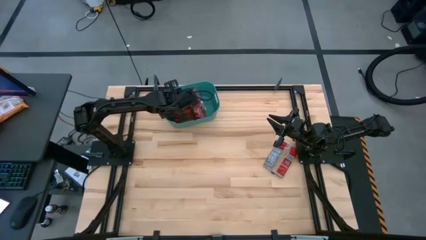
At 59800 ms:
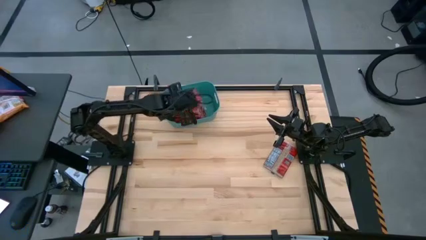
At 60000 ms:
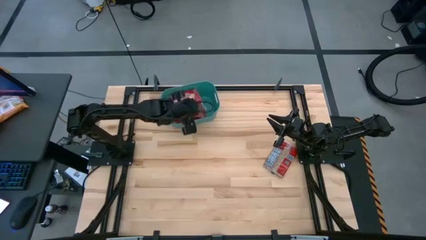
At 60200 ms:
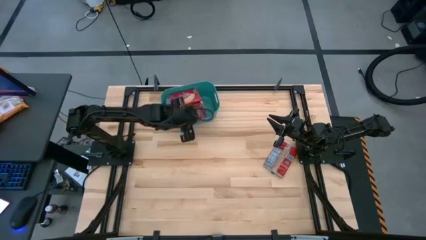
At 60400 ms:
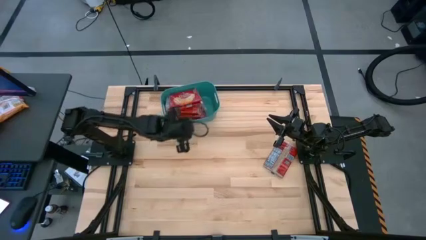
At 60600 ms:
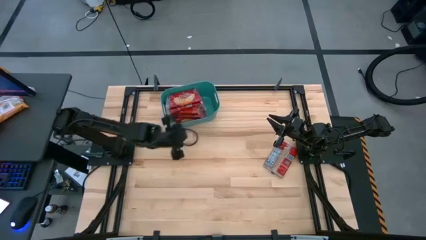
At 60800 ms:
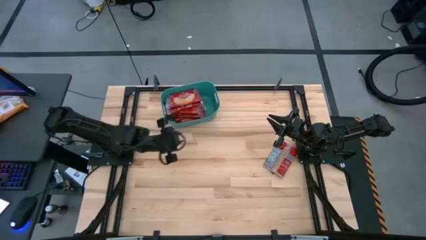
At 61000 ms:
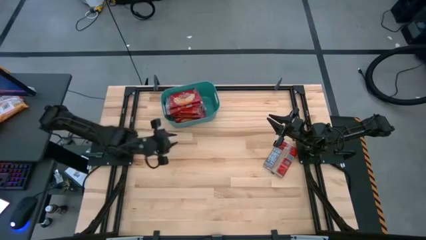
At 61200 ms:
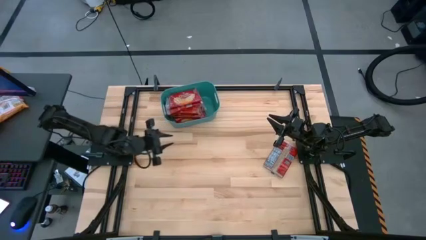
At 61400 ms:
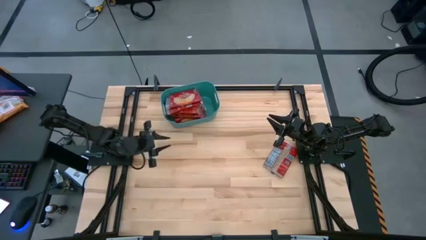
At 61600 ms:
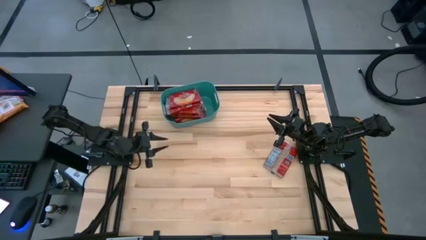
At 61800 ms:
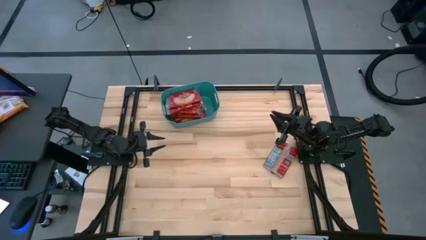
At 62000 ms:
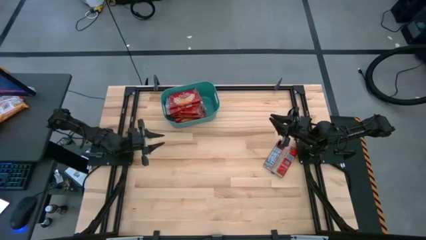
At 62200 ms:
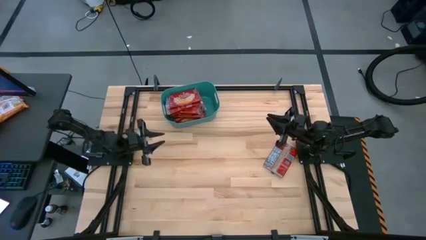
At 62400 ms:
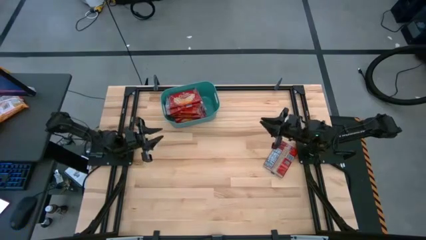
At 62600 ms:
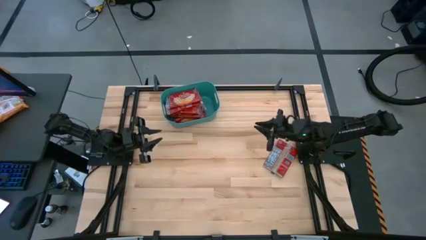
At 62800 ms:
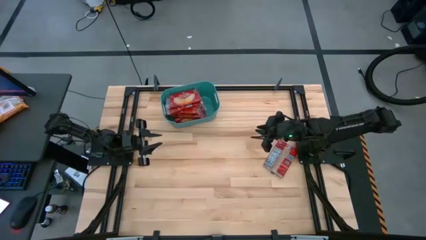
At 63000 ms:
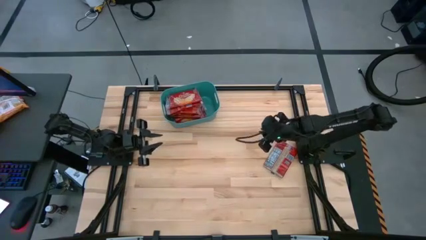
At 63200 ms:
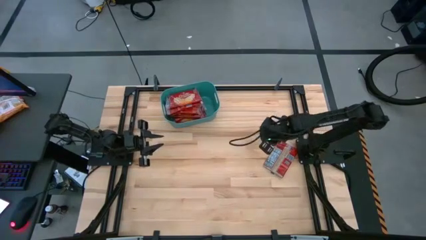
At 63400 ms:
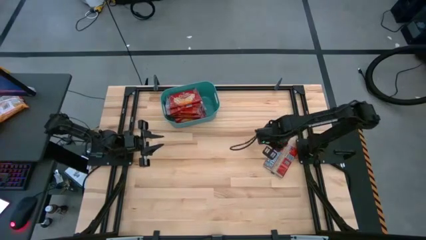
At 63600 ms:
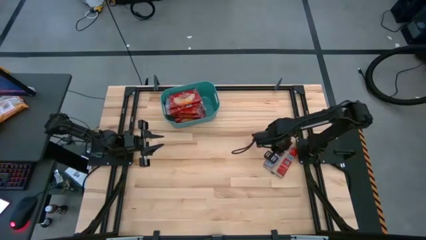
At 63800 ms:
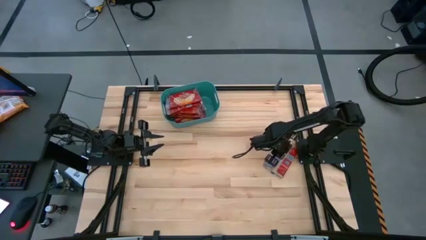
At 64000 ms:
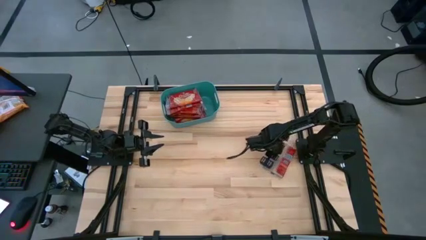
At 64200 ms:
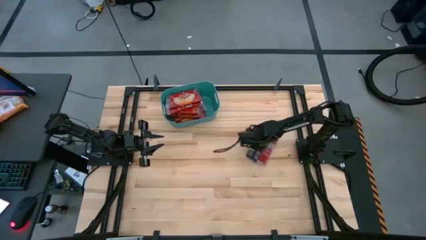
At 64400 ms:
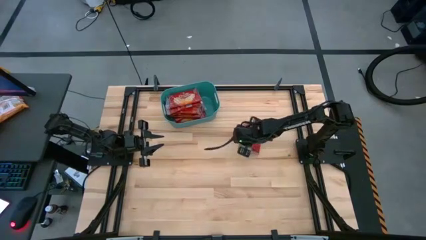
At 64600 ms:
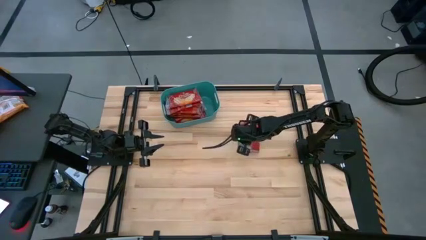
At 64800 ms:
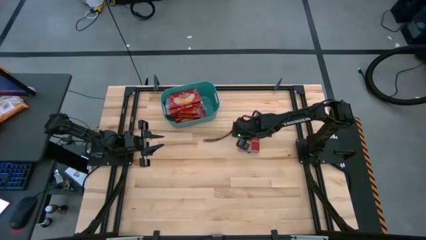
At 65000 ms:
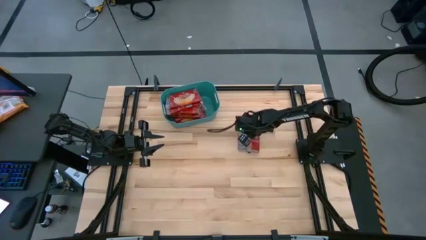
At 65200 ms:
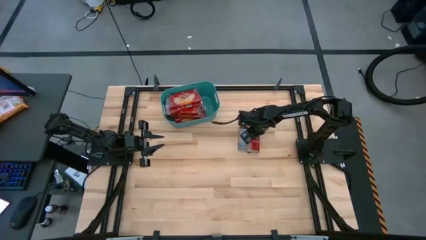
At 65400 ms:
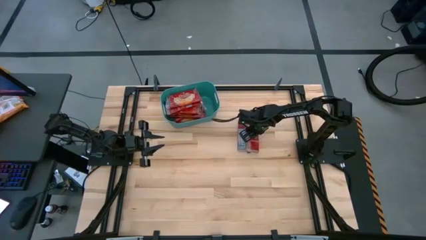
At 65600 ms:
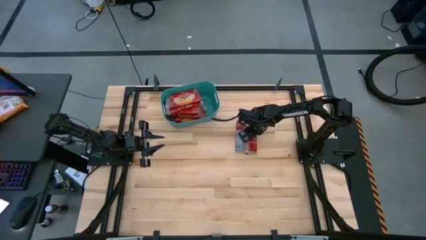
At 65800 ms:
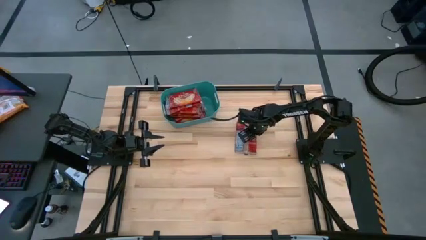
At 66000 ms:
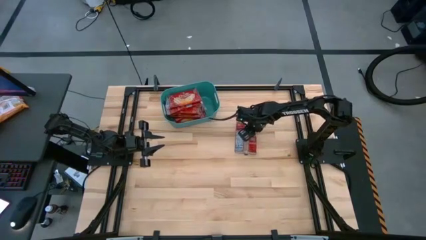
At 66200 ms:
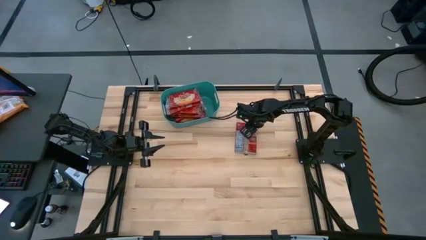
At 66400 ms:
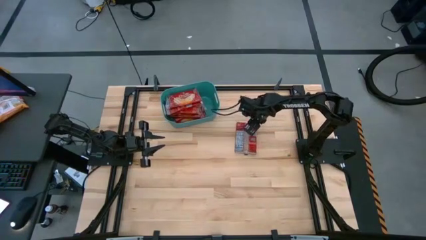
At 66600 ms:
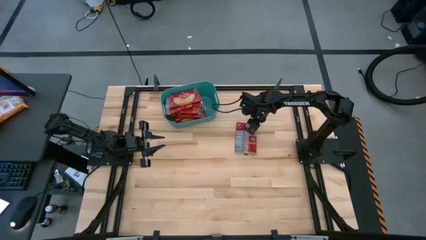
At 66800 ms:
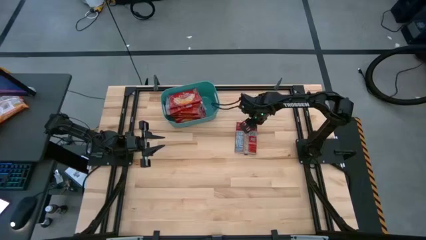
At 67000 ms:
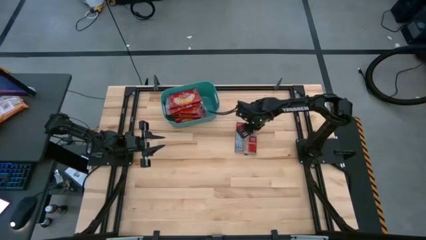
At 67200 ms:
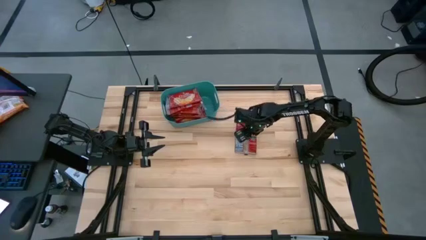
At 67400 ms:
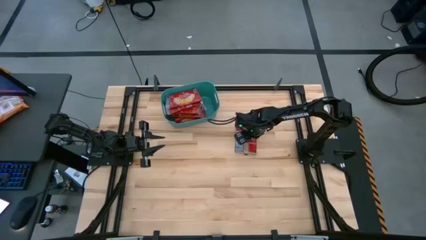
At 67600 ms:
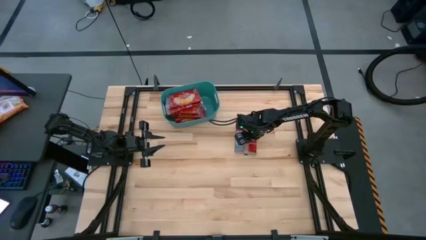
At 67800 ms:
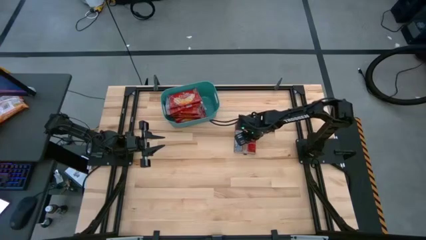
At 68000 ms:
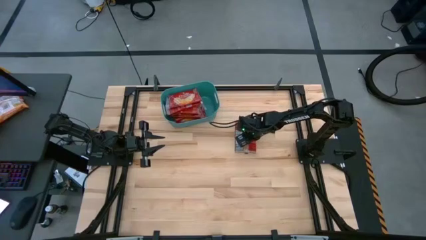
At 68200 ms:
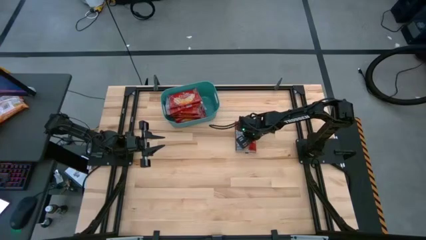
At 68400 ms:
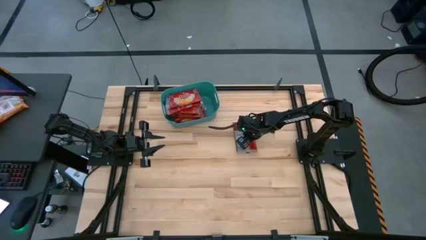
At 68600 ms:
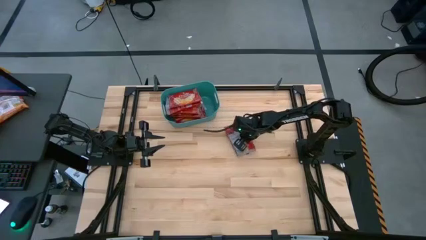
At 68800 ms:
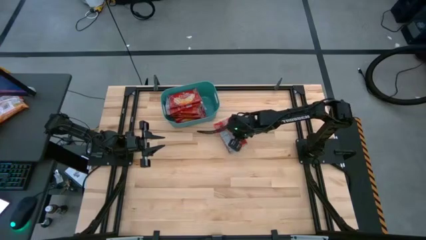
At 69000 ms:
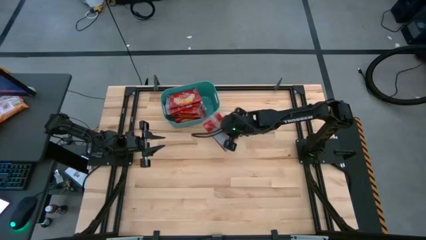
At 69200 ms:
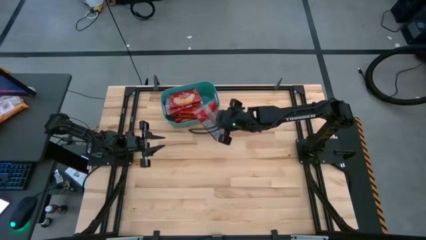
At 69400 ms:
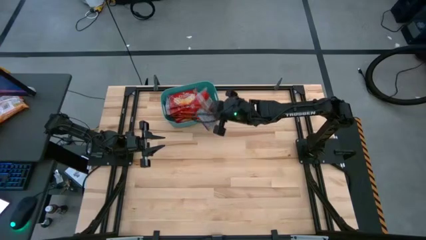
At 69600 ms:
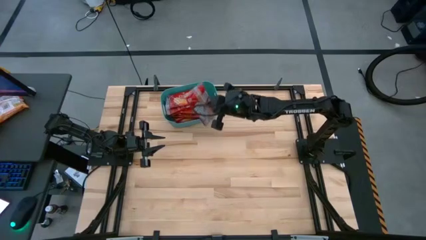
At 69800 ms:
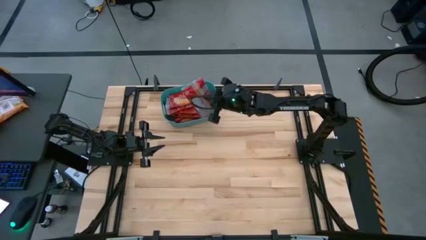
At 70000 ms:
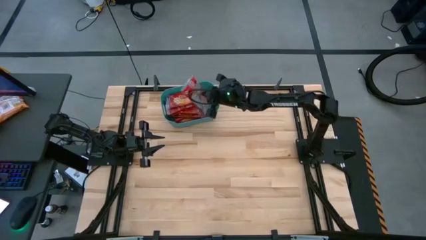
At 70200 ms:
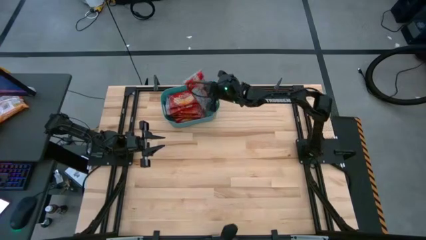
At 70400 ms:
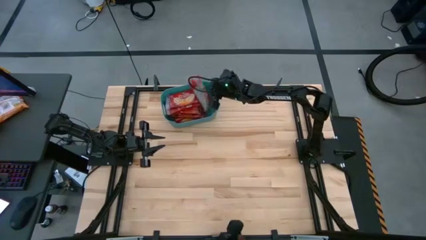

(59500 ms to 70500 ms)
Task: Sort popcorn bags into baskets
Stack the popcorn bag into the green bin

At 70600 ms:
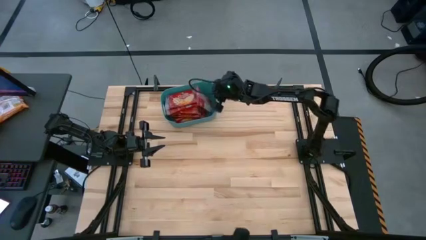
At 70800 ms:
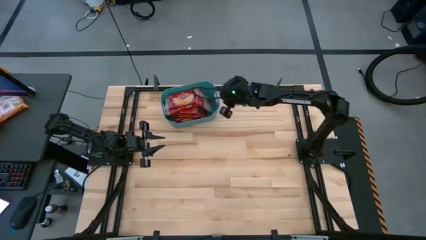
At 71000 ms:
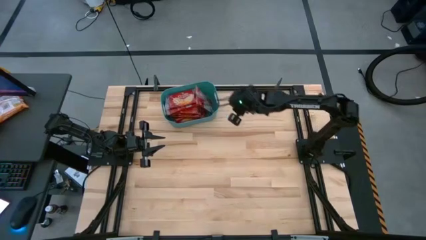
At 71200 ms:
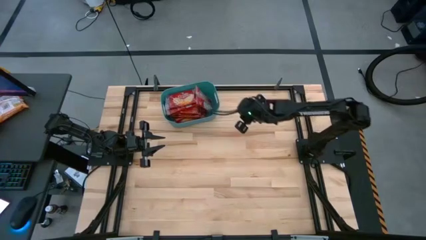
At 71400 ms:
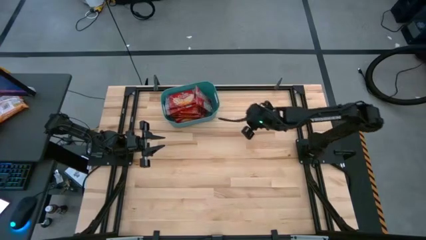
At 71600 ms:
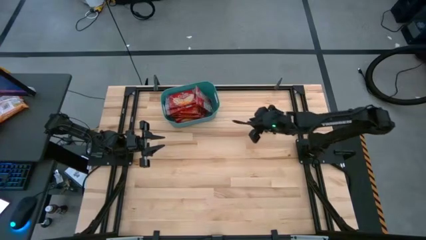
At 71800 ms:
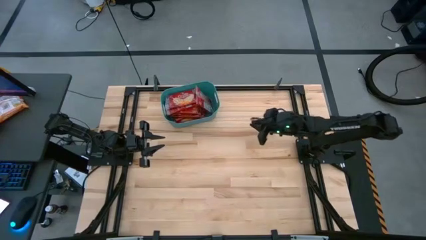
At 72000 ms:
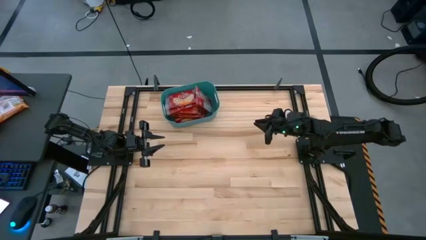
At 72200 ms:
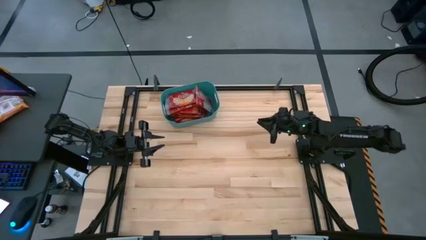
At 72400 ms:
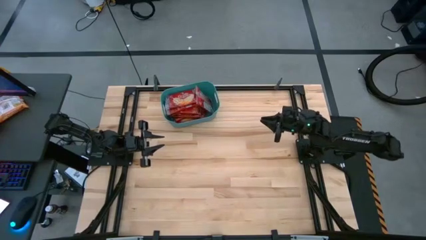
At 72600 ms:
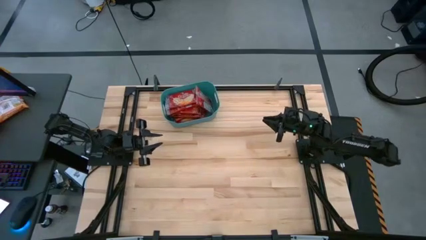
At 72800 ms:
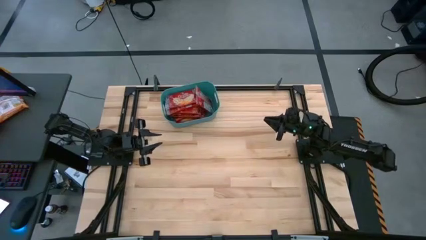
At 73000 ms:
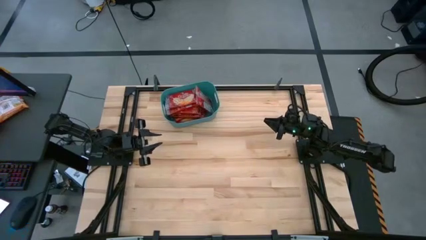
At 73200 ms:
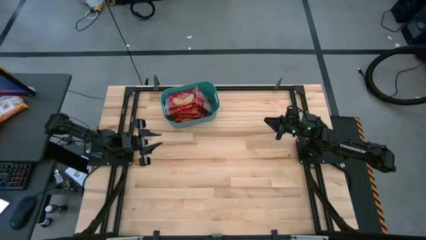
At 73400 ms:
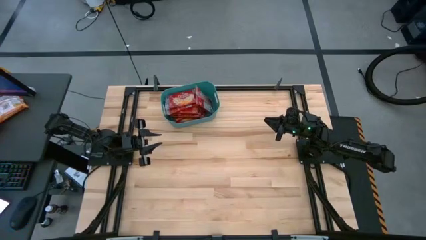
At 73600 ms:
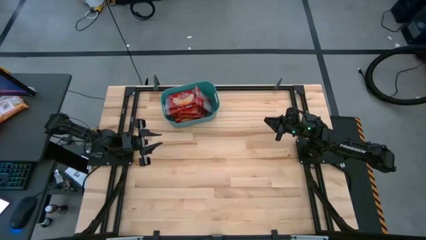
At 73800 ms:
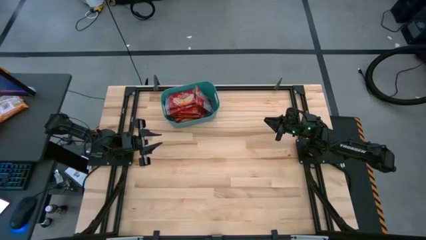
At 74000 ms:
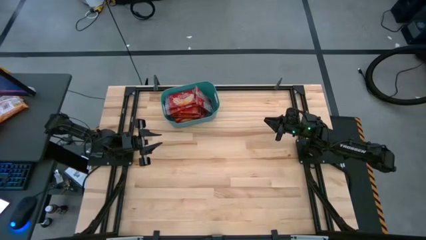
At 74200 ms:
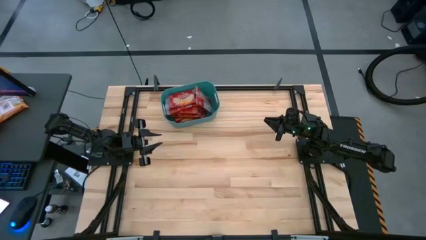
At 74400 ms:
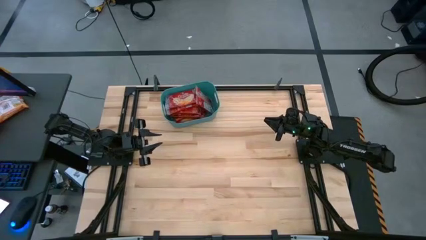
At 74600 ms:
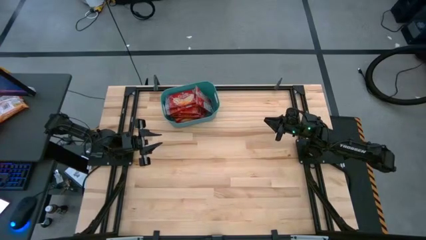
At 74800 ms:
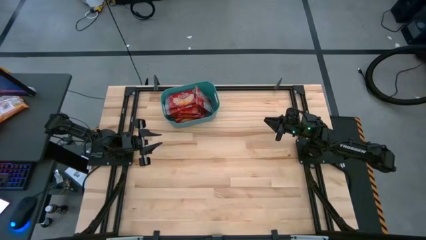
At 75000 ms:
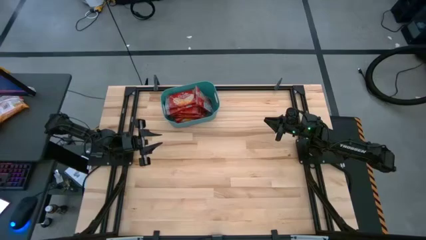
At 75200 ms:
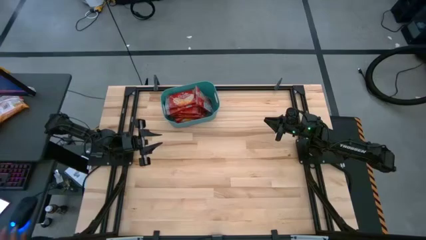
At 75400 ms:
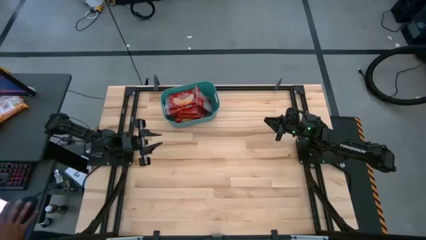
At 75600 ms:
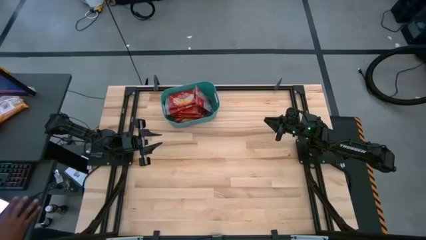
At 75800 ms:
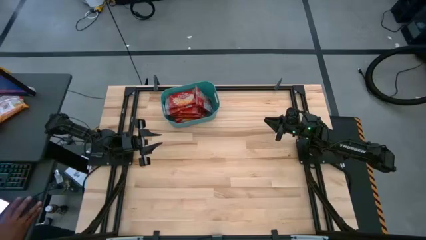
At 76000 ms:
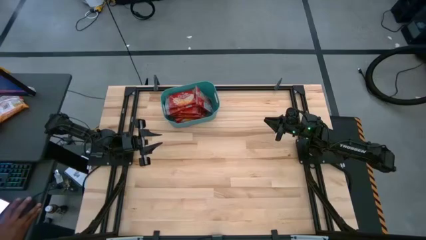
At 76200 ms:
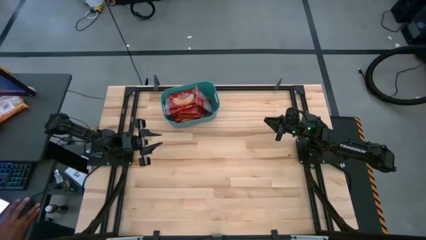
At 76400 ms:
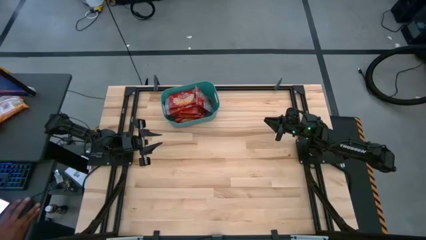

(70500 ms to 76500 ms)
Return to Home Position
